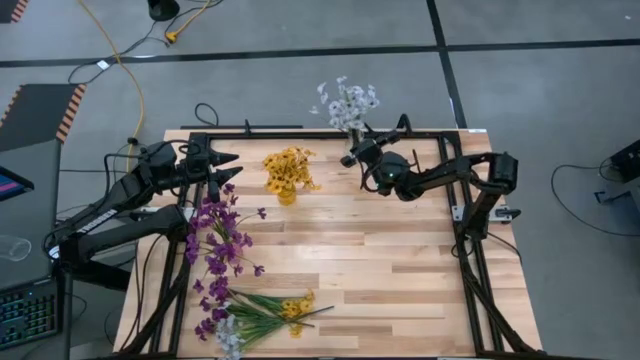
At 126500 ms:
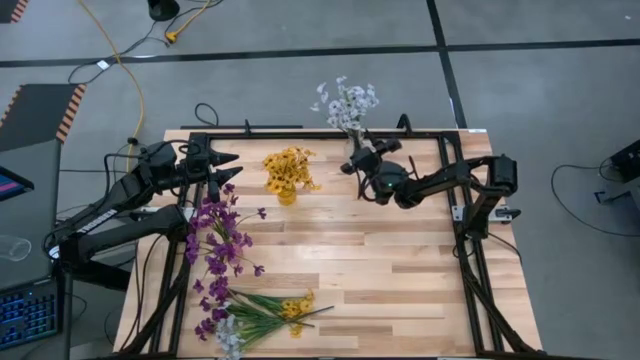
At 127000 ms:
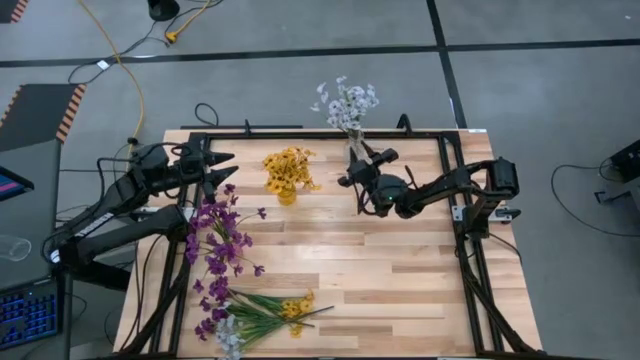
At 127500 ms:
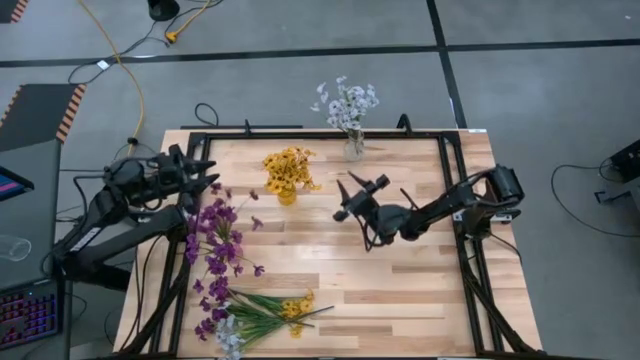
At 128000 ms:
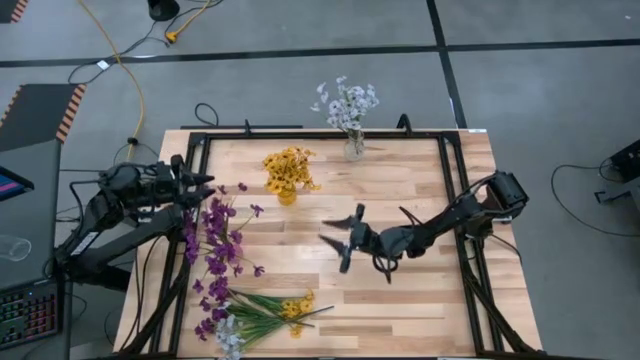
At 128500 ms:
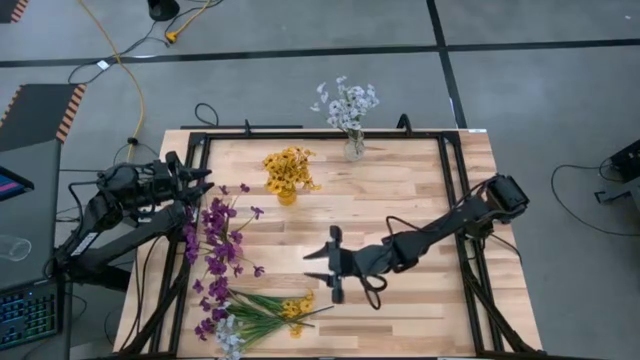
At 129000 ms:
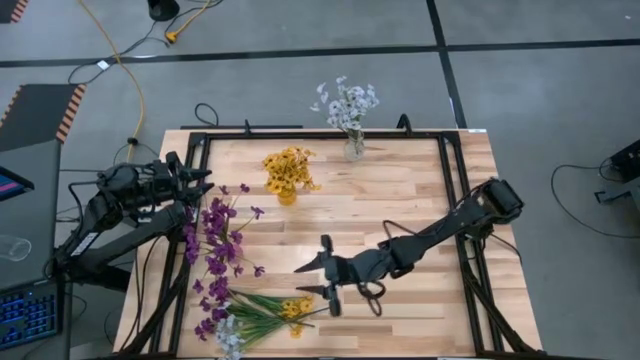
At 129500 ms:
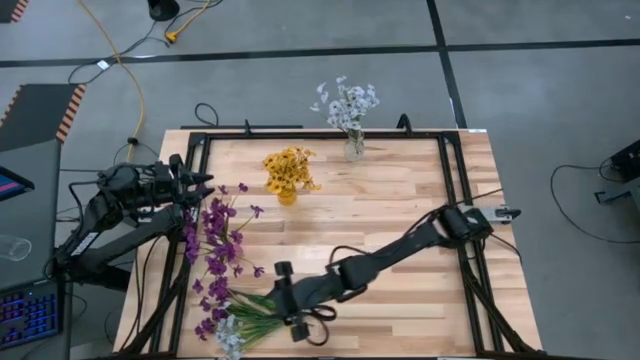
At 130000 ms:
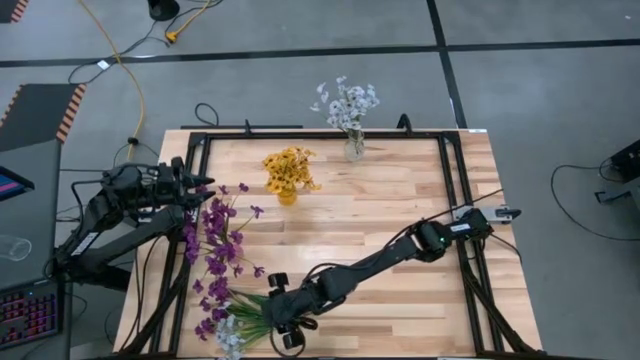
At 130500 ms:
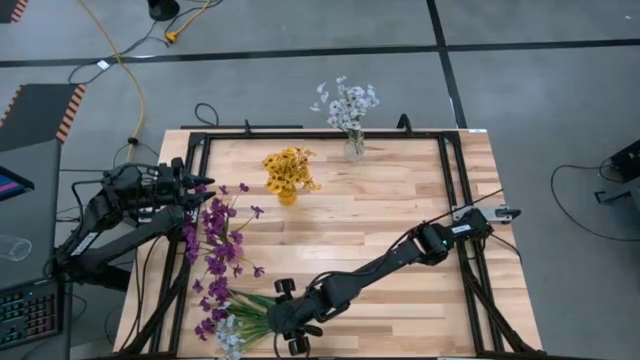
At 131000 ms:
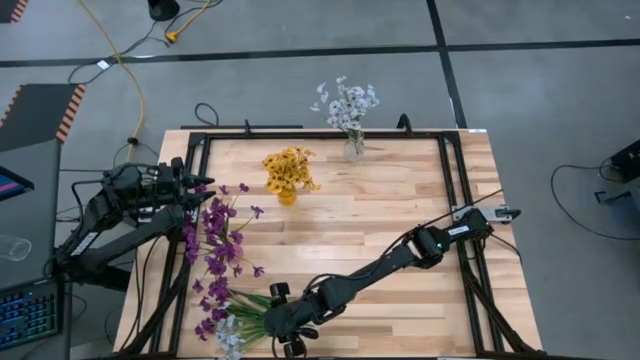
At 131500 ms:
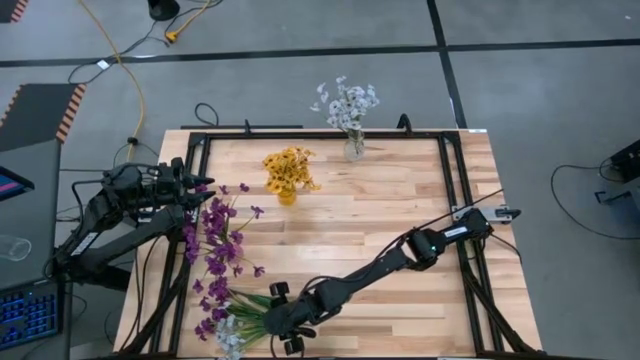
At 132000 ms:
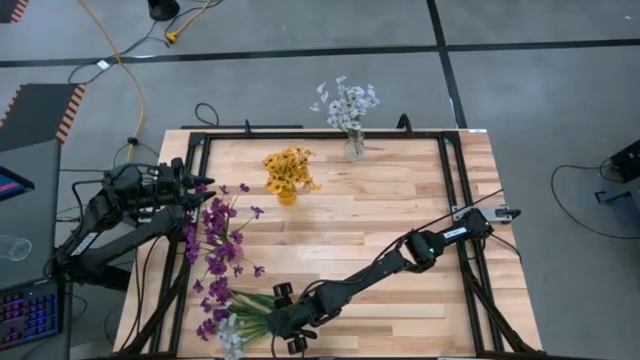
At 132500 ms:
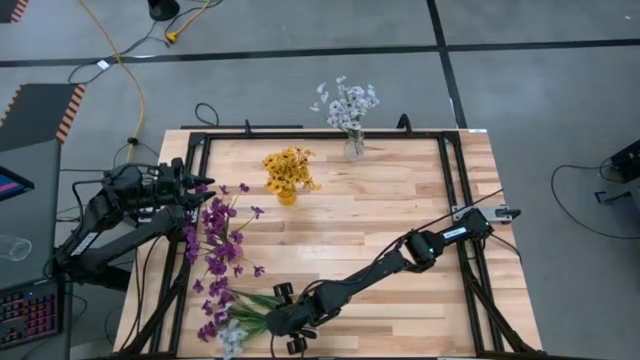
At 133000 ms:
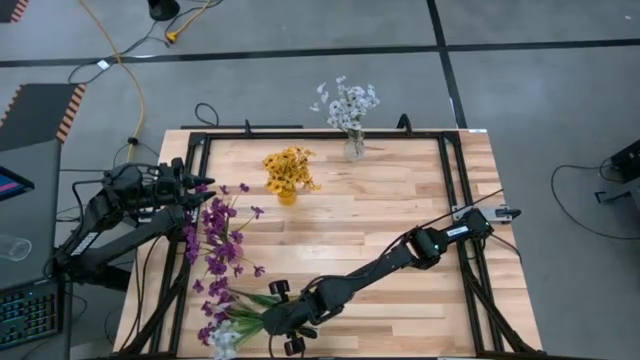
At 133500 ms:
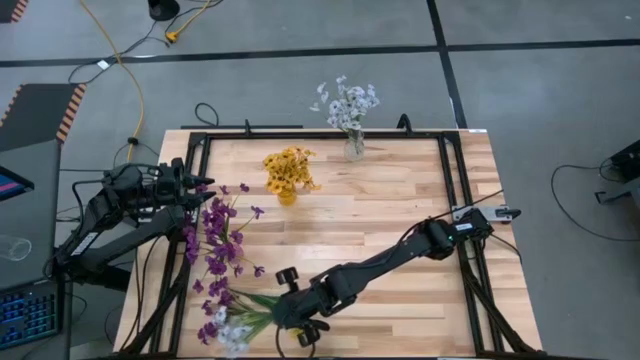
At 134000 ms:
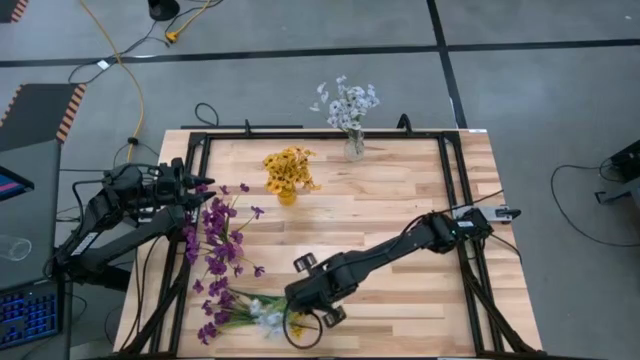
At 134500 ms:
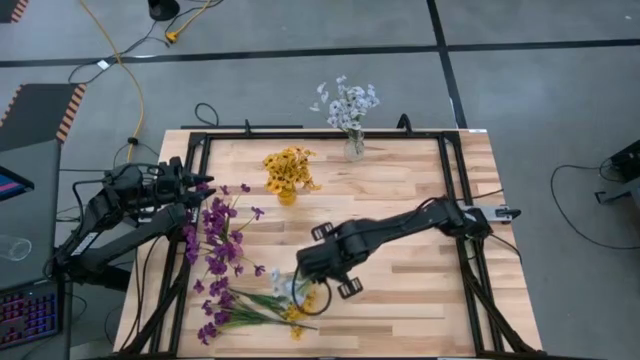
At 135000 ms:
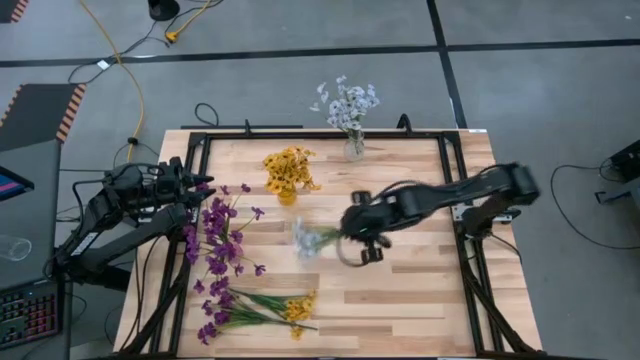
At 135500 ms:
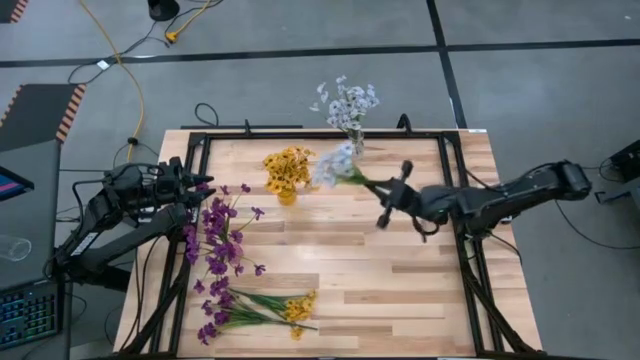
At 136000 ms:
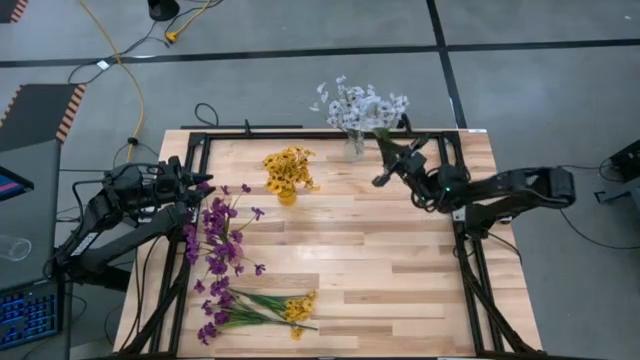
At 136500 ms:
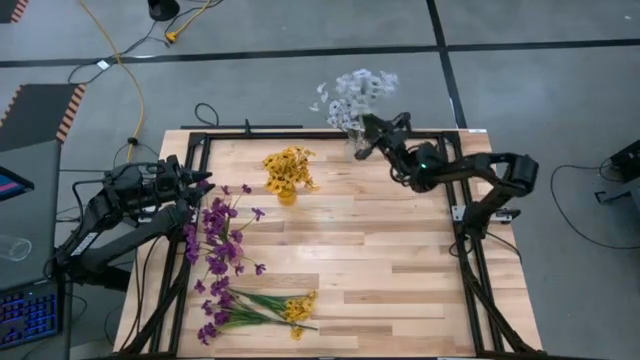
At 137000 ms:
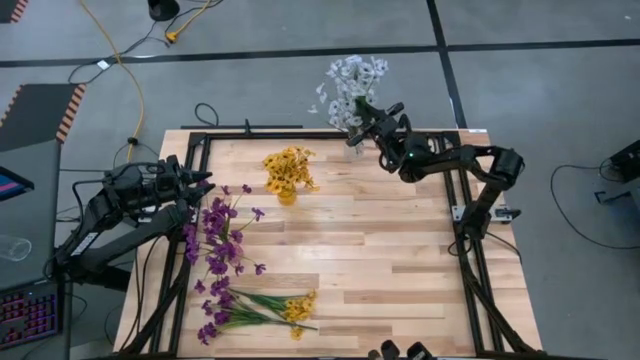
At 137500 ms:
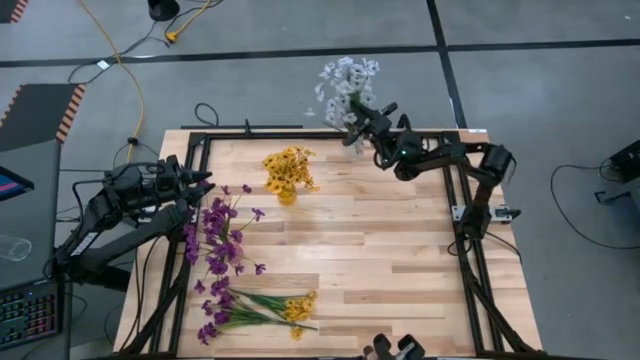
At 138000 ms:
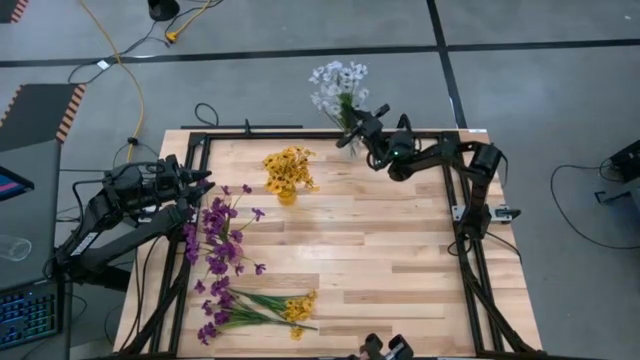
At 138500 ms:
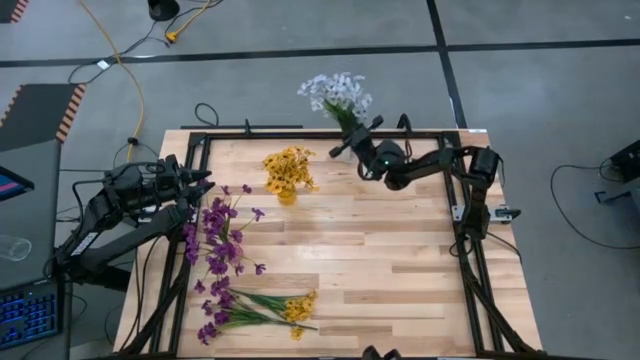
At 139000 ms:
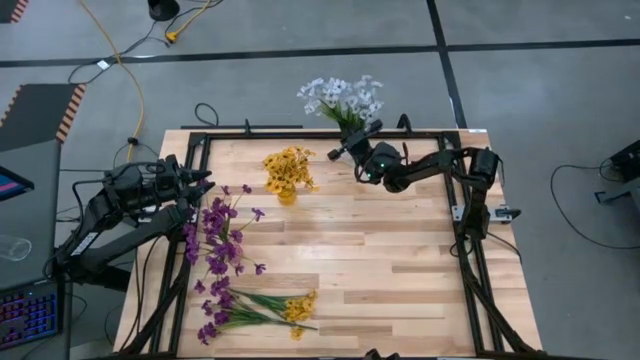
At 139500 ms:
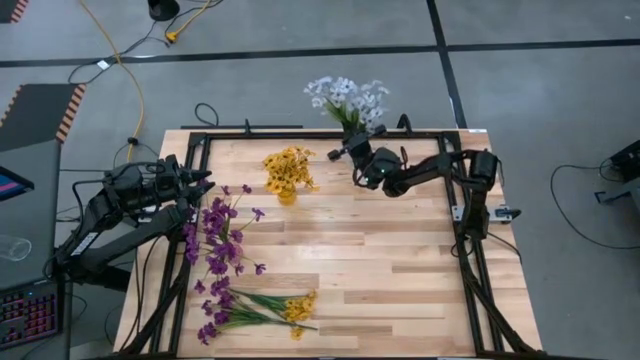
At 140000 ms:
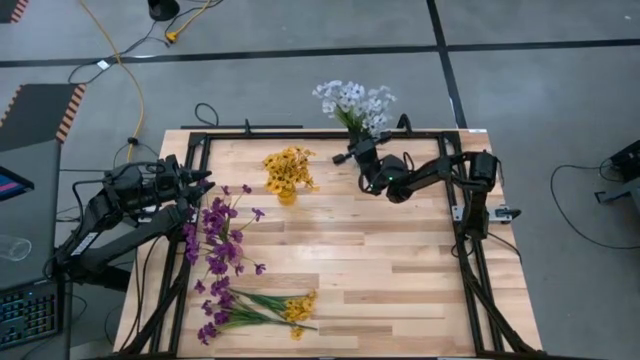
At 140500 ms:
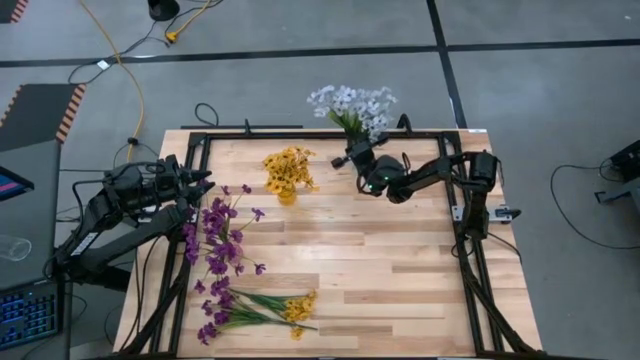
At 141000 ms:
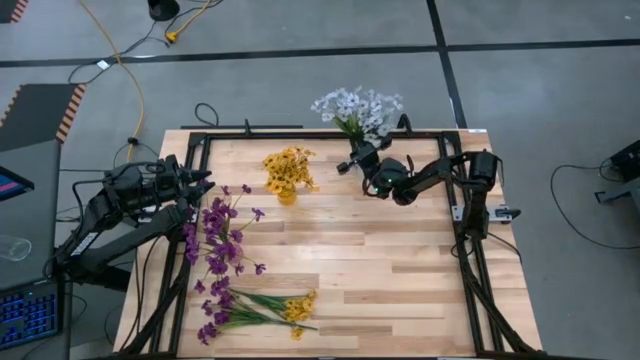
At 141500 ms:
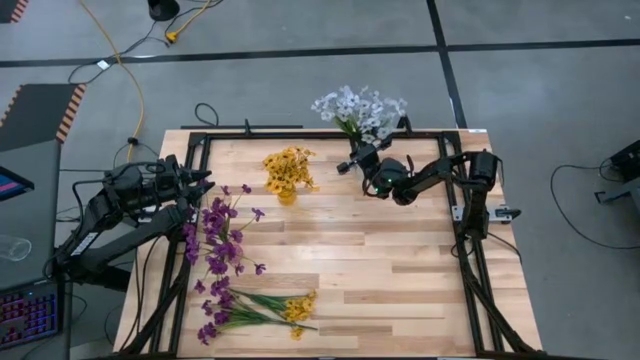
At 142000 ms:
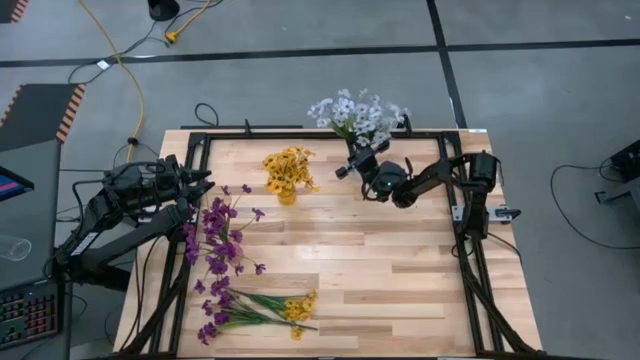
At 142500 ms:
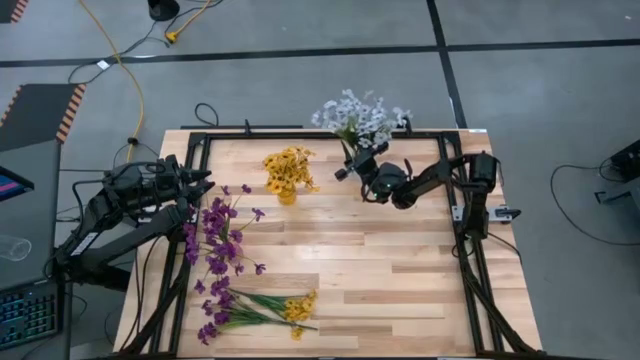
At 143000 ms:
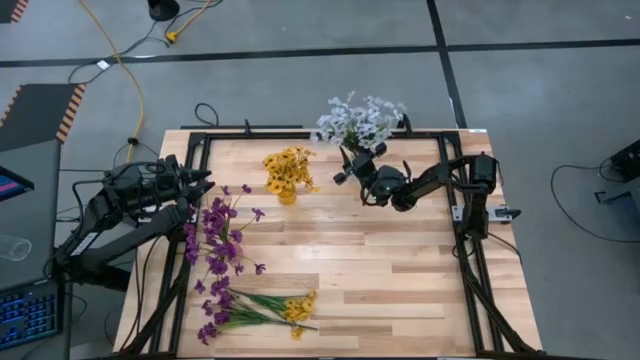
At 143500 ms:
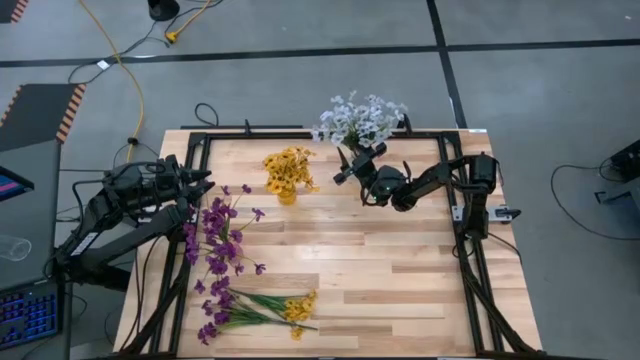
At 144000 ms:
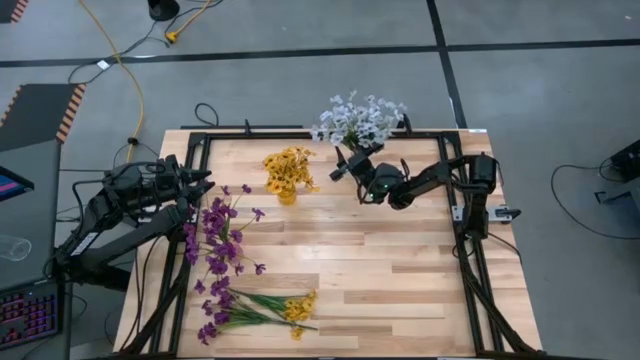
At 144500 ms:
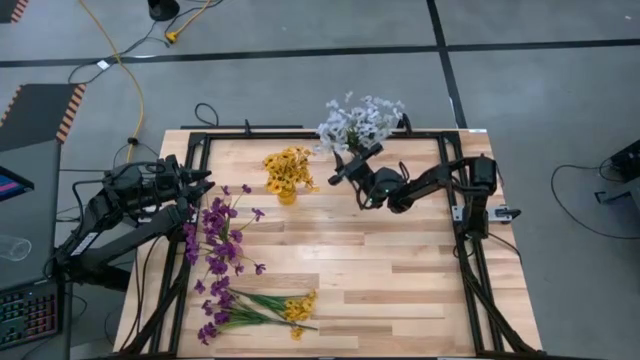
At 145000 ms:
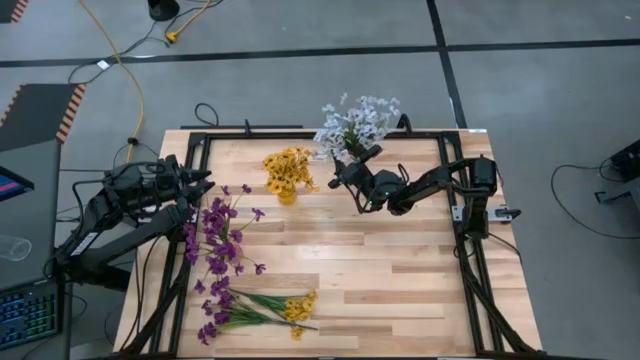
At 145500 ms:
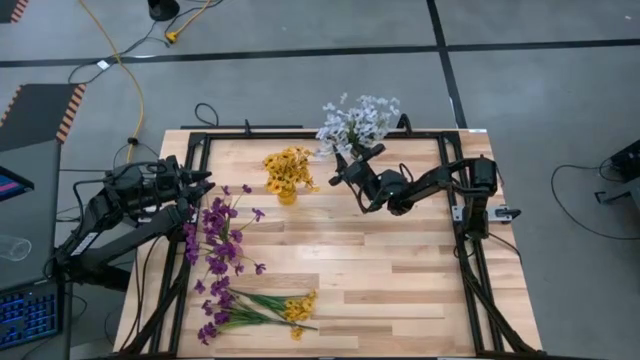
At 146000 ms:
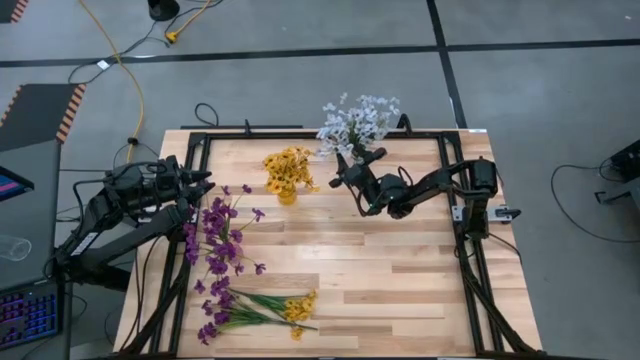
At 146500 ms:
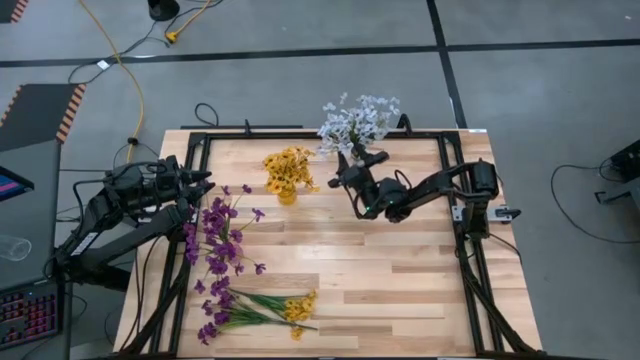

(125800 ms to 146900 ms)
Task: Sort flowers into vase by color
Put the white flowers into the transparent vase
